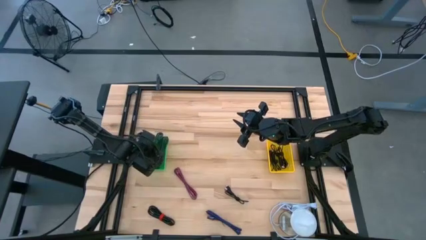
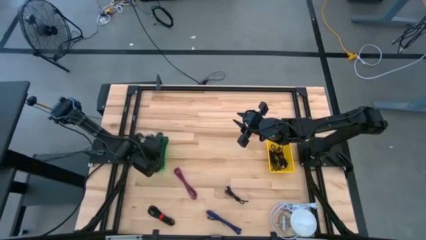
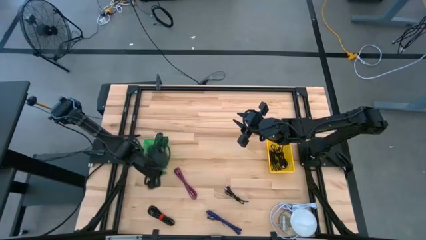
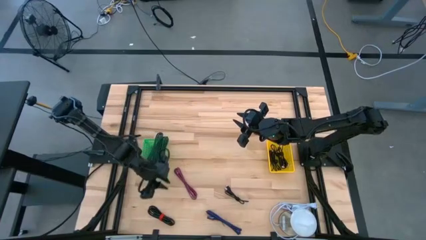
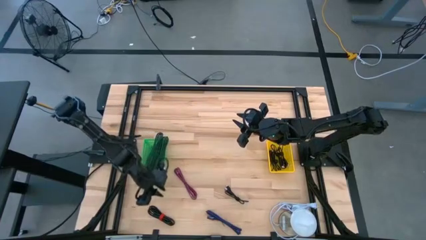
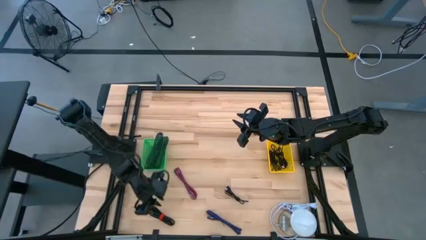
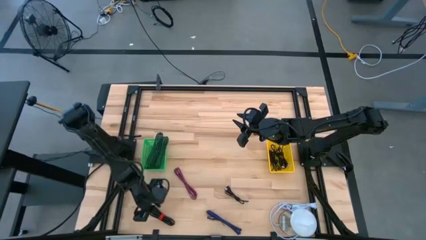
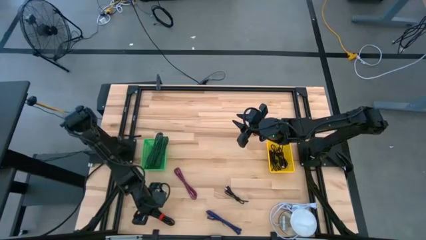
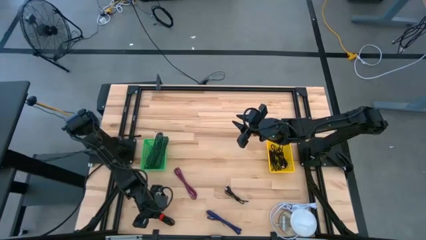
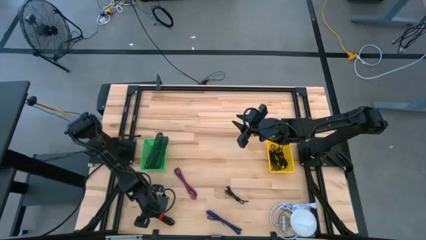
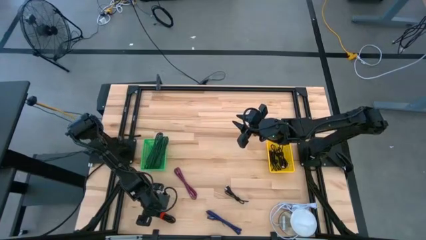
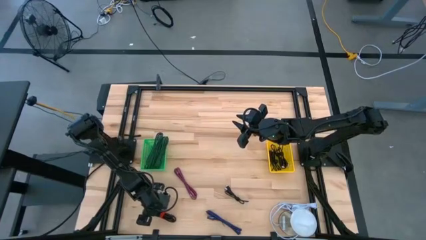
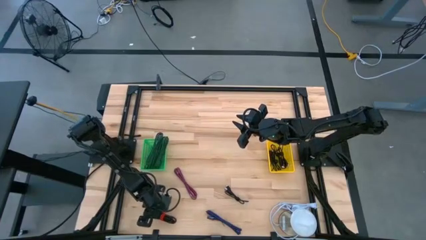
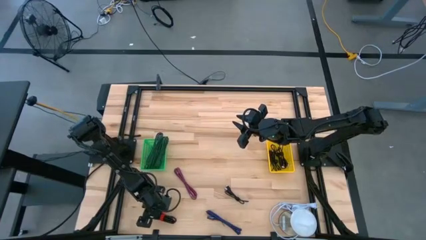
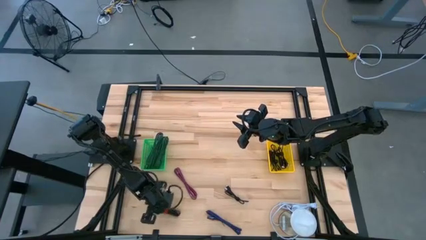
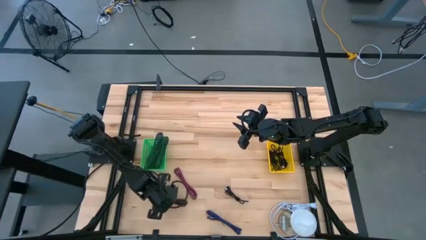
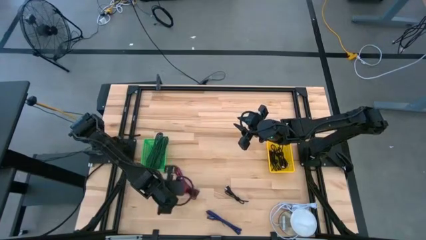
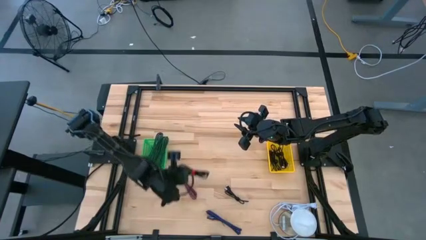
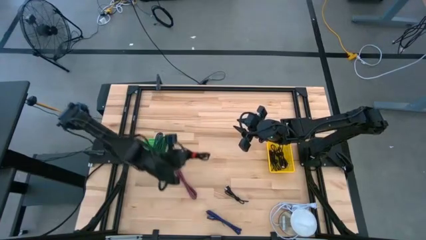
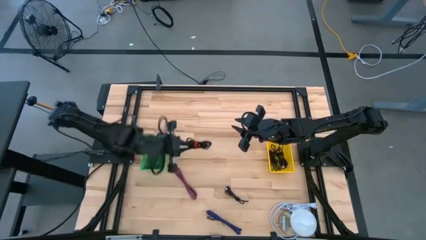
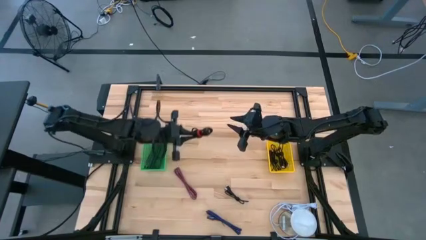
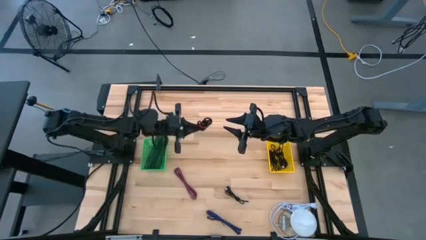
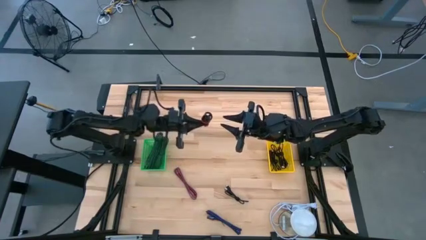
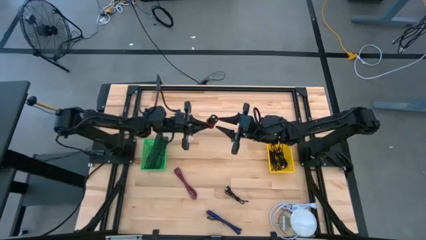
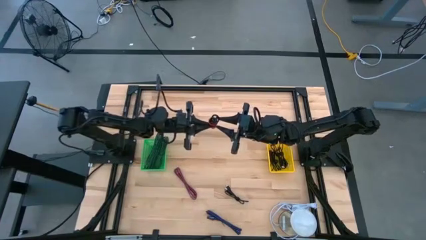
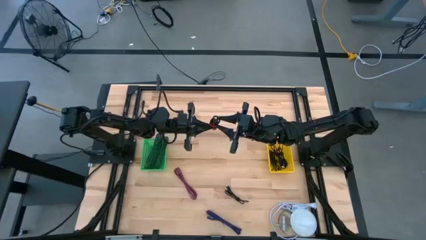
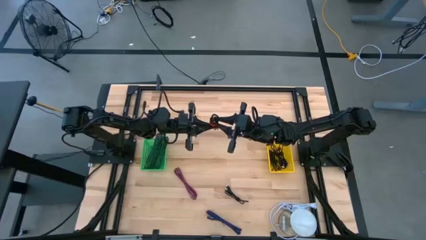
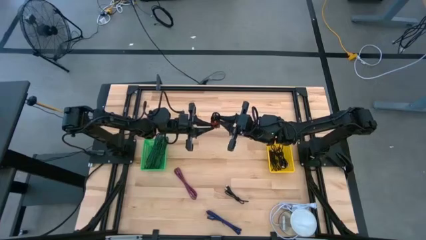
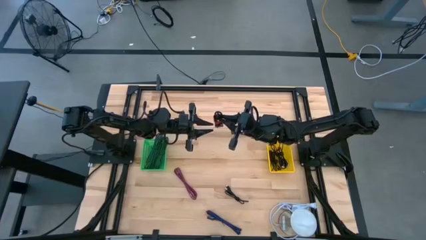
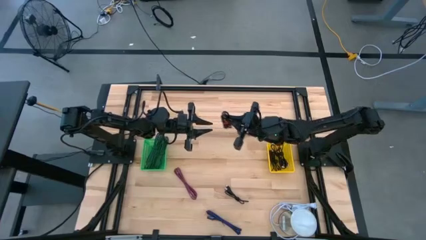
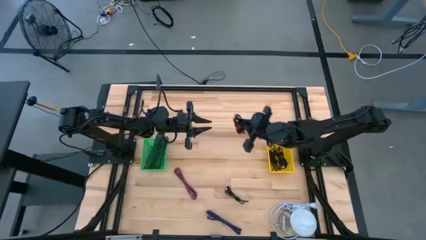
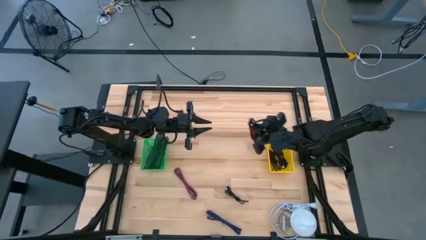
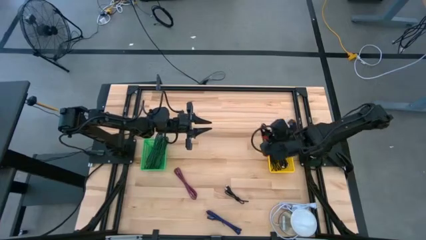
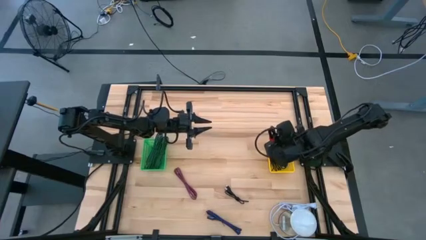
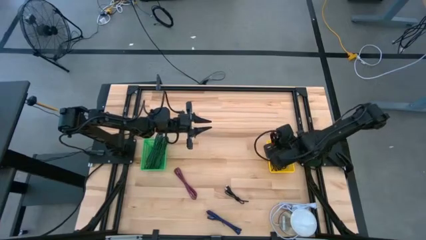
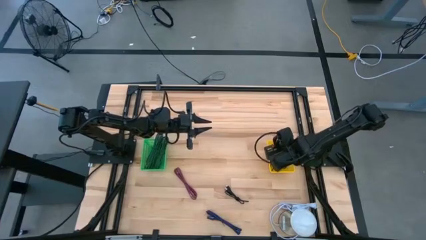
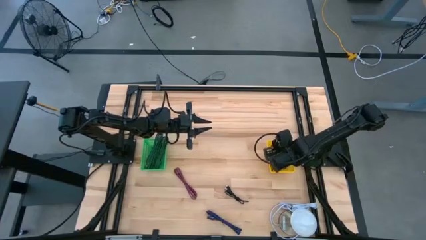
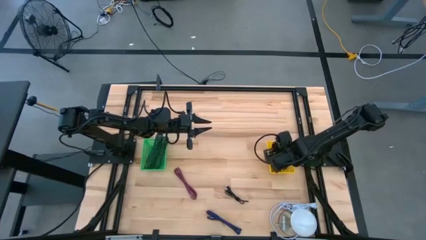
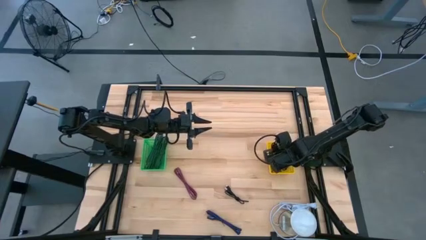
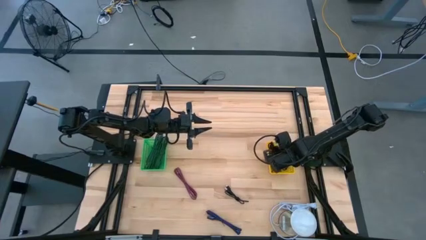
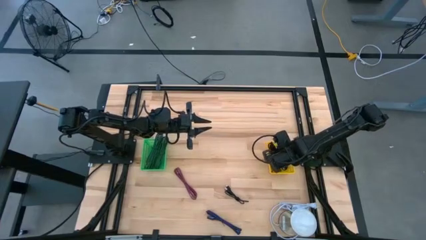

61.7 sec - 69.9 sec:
Task: Pick & Place USB Port
Put the black charger adaptor into the yellow bin

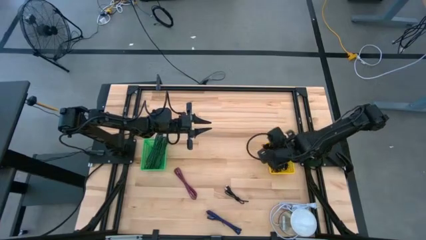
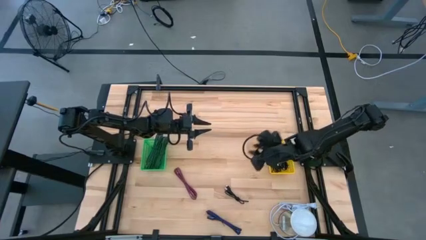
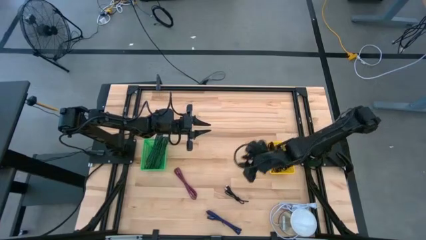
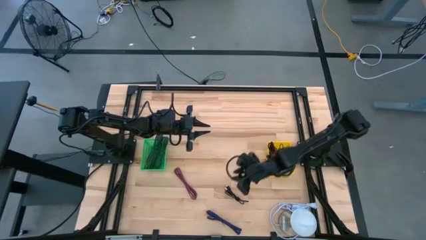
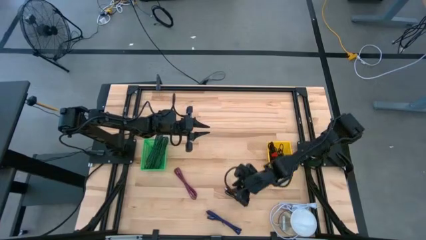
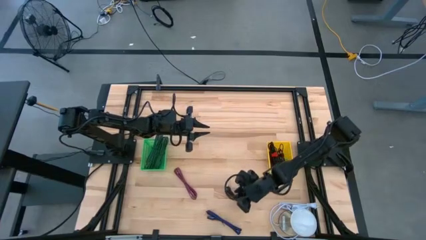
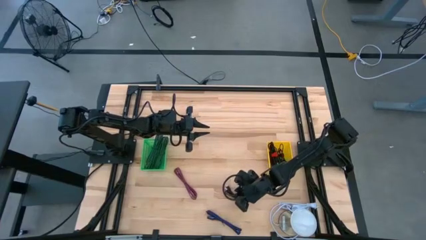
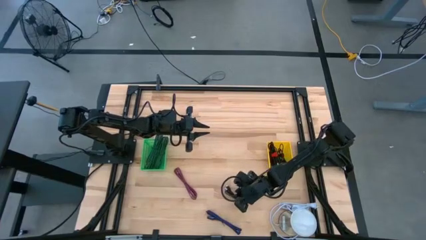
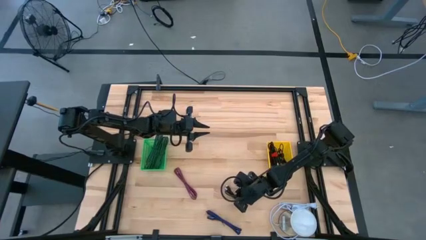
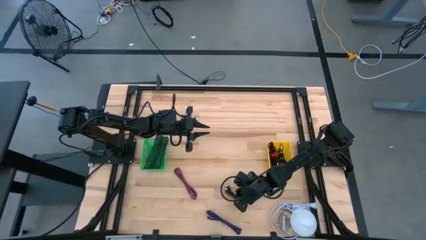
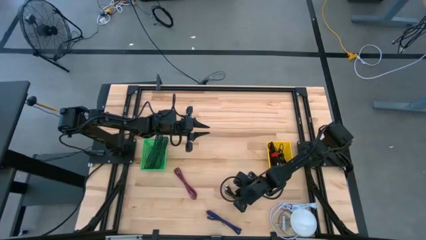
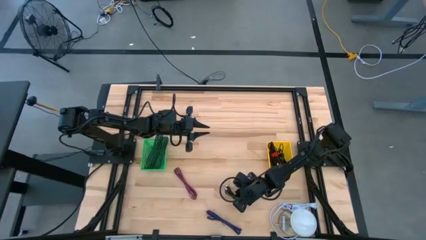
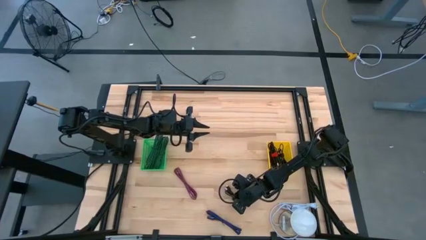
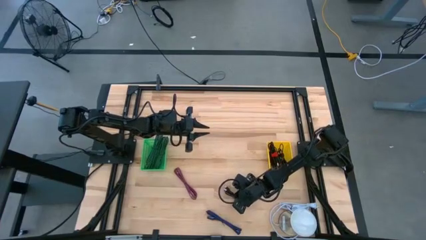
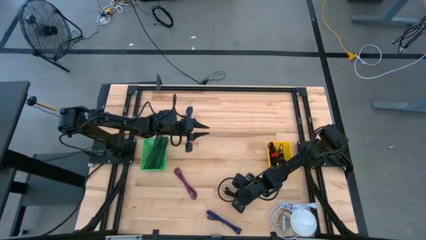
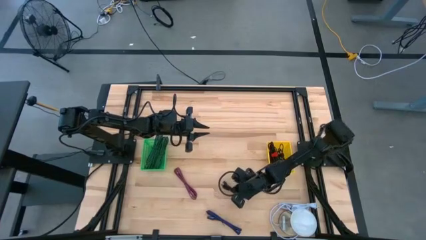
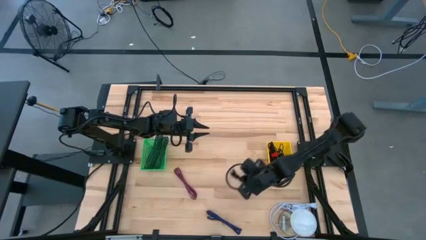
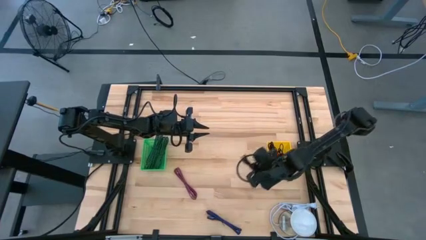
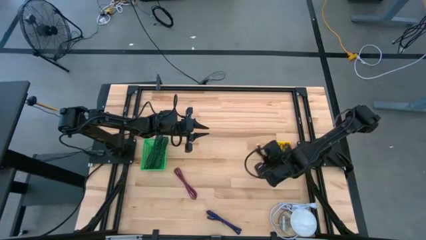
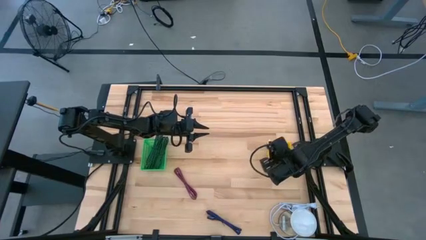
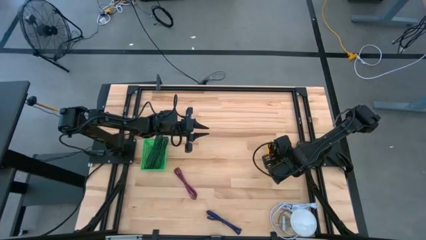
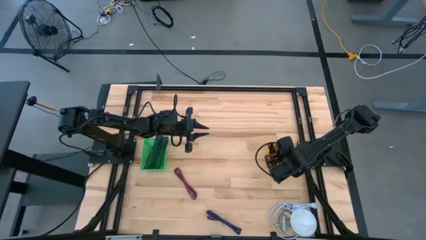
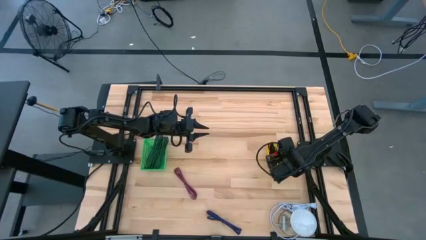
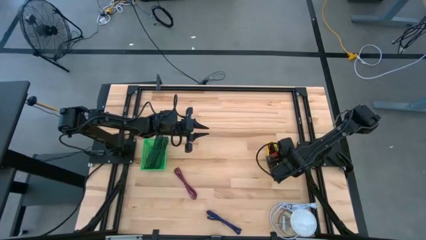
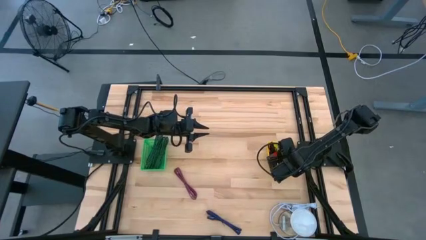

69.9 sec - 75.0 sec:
Put the black charger adaptor into the yellow bin

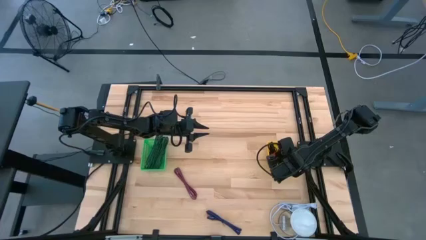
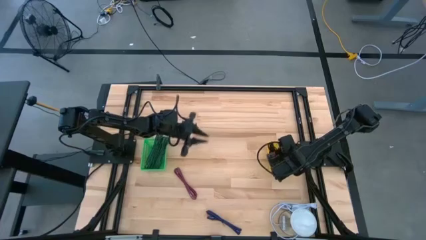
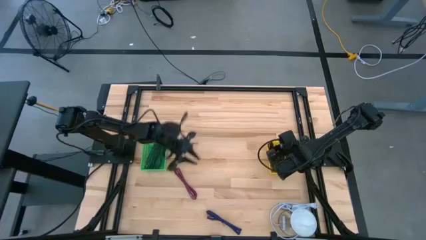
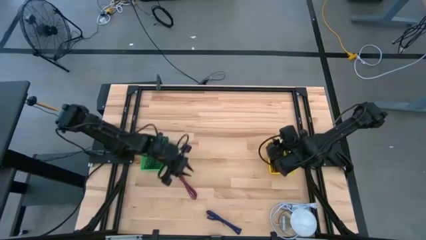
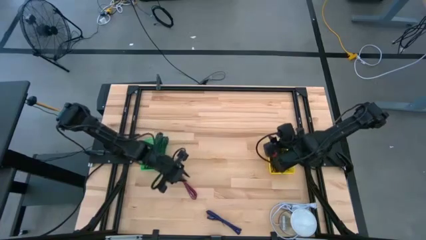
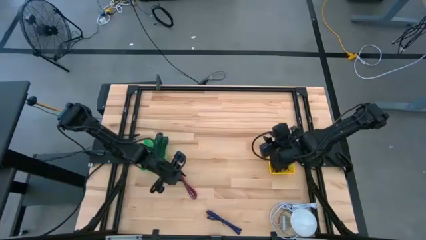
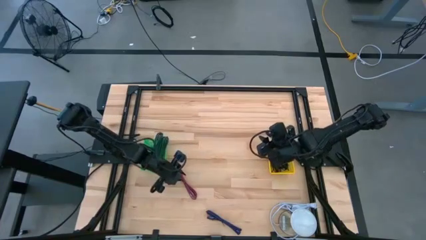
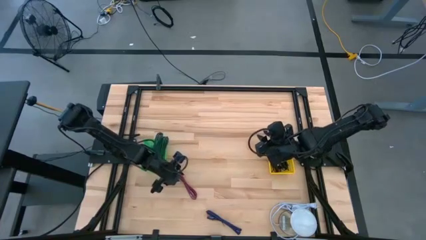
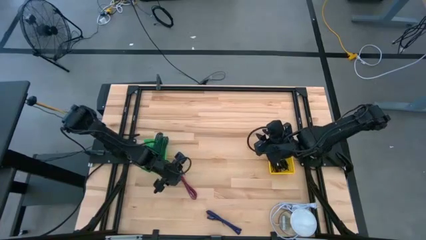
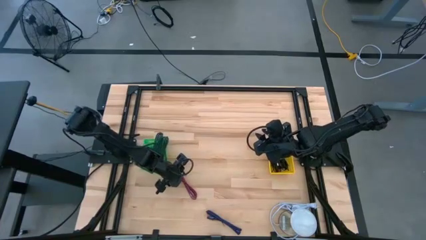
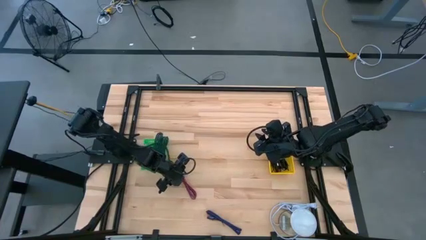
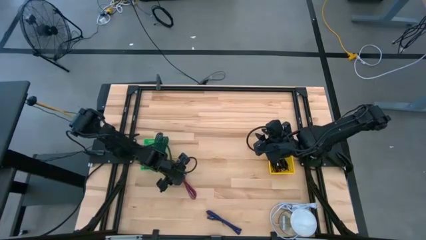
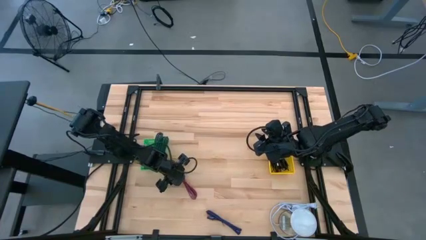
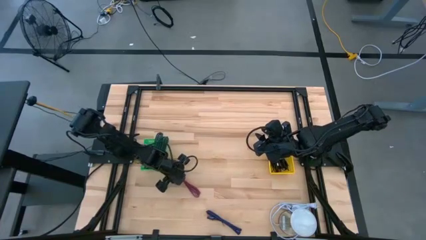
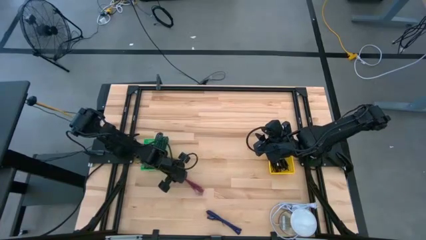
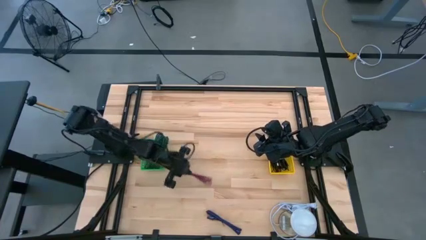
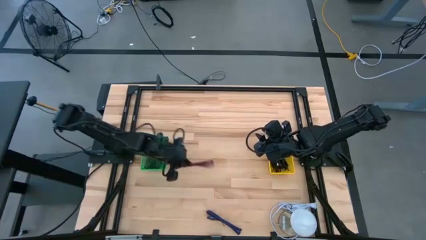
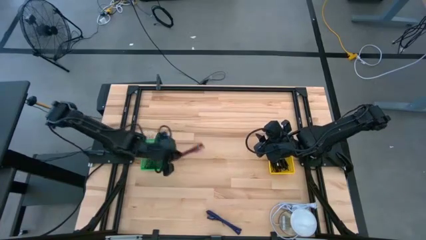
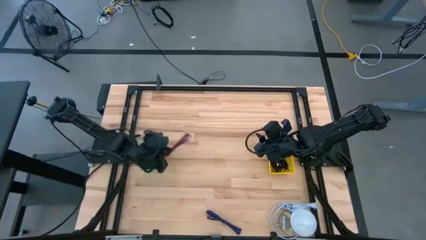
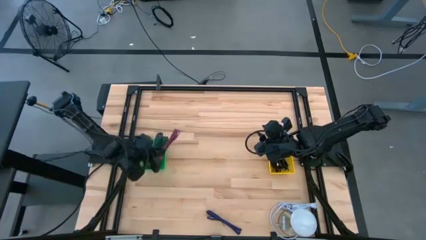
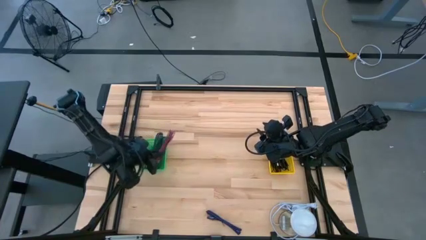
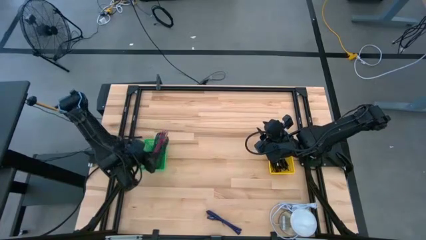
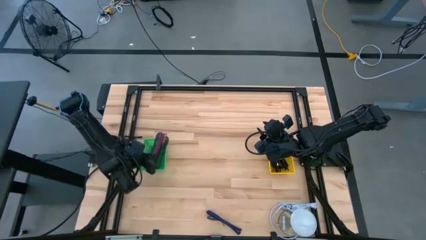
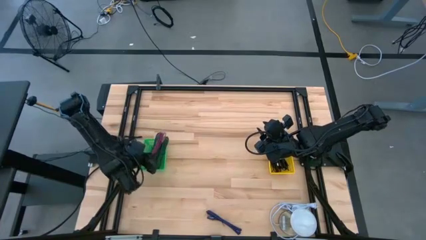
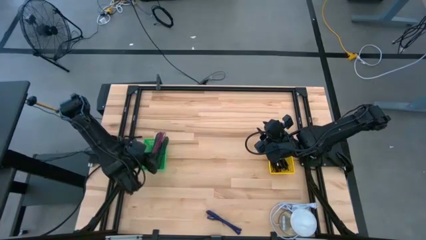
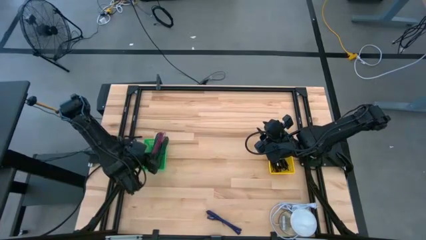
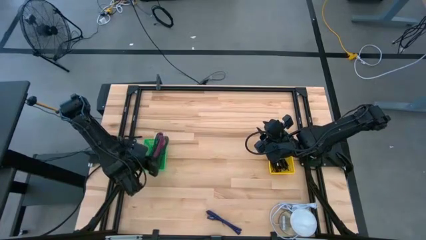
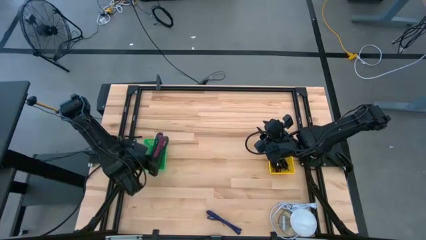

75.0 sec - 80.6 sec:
Put the pink black charger cable into the green bin
